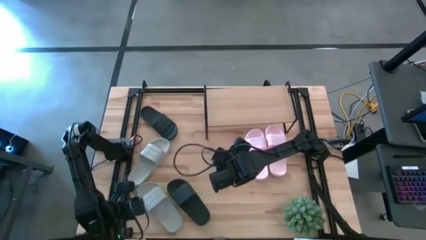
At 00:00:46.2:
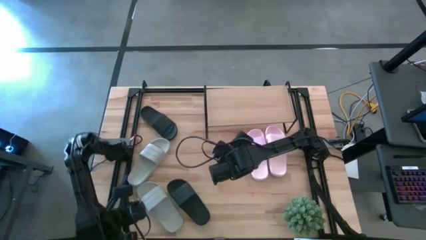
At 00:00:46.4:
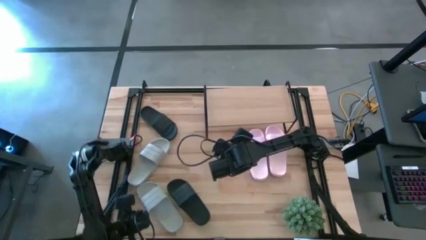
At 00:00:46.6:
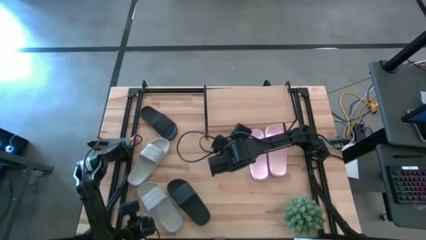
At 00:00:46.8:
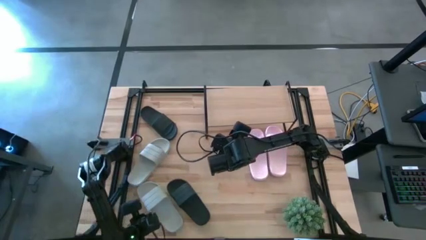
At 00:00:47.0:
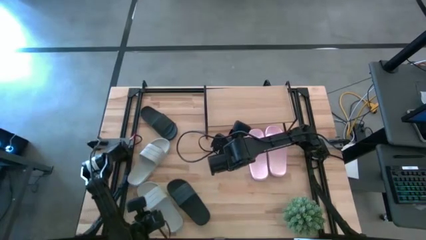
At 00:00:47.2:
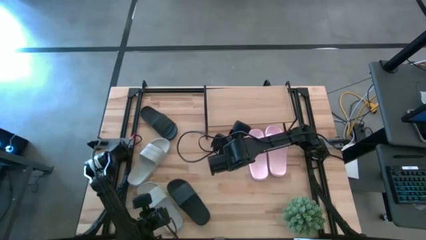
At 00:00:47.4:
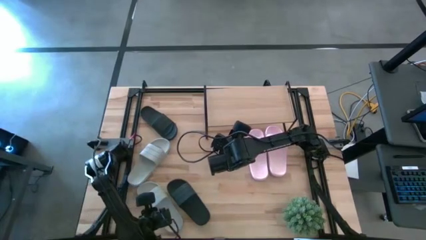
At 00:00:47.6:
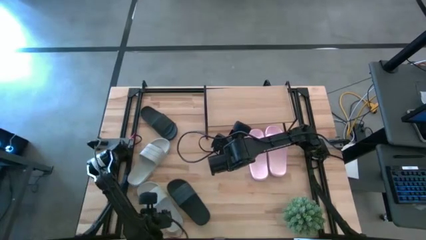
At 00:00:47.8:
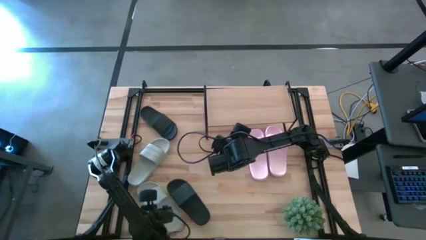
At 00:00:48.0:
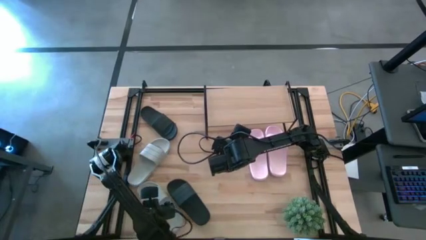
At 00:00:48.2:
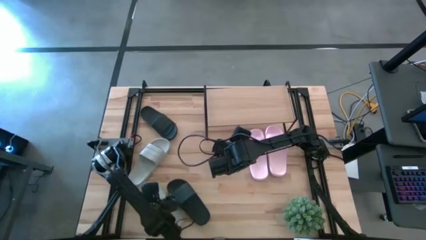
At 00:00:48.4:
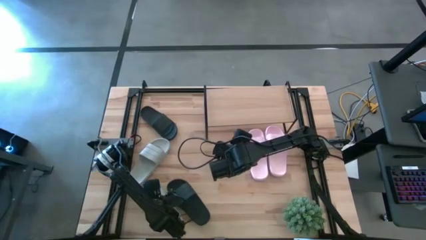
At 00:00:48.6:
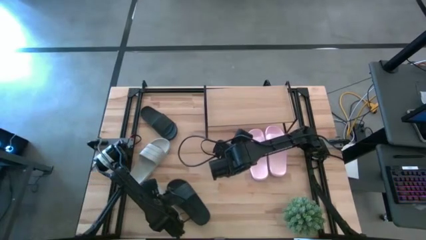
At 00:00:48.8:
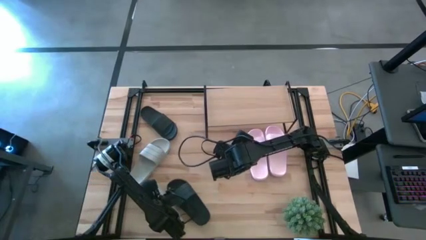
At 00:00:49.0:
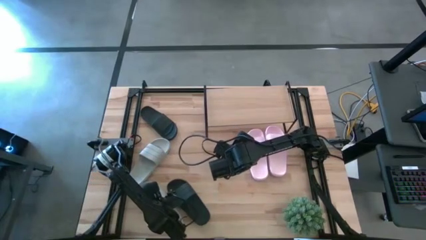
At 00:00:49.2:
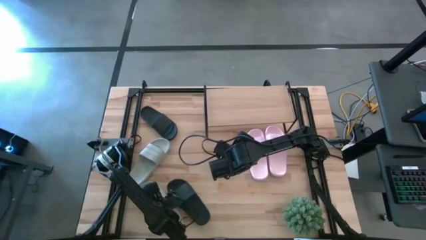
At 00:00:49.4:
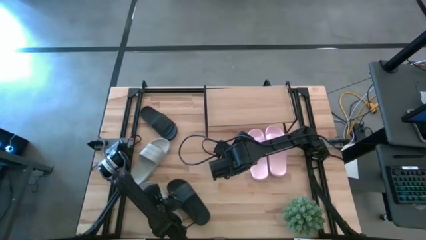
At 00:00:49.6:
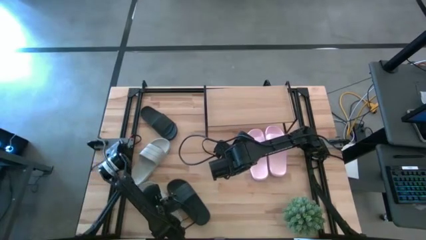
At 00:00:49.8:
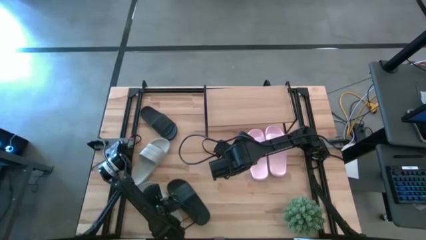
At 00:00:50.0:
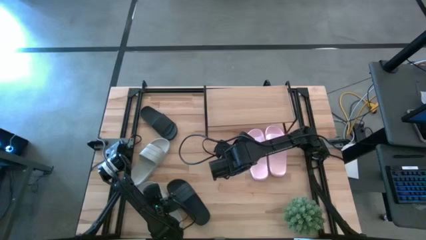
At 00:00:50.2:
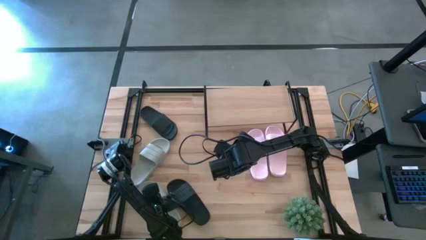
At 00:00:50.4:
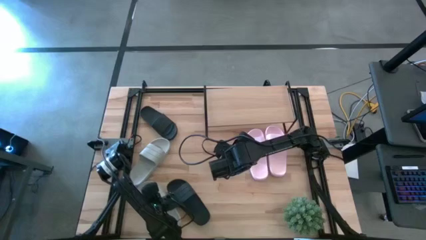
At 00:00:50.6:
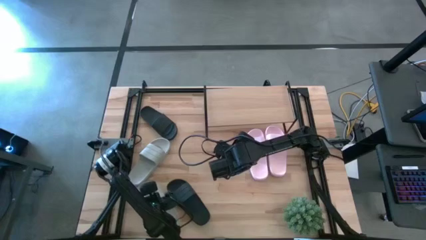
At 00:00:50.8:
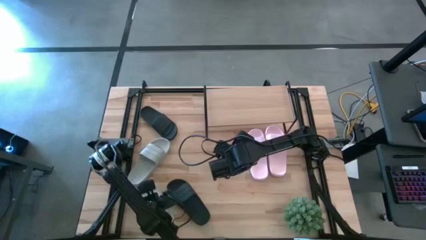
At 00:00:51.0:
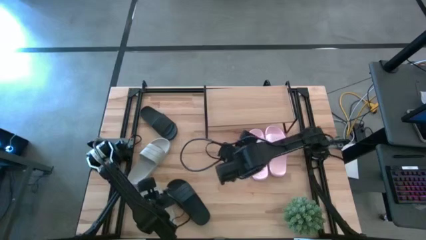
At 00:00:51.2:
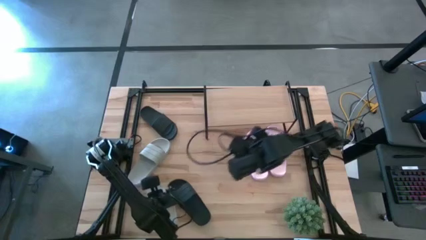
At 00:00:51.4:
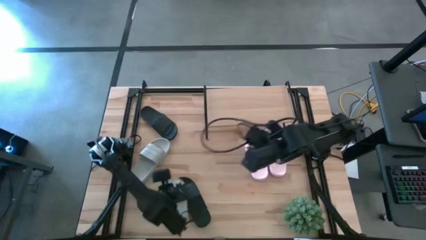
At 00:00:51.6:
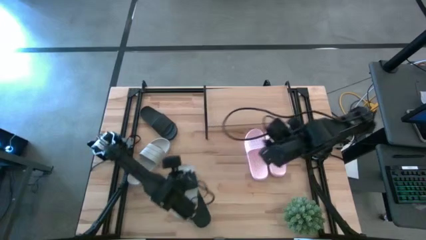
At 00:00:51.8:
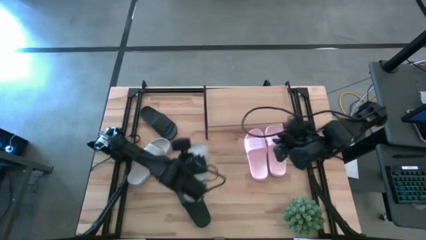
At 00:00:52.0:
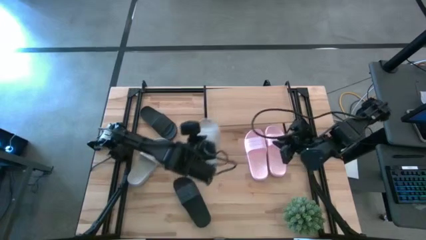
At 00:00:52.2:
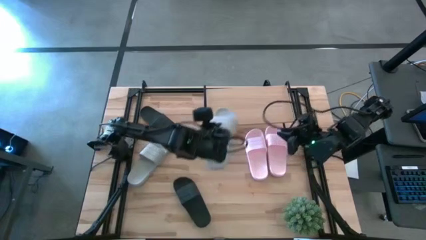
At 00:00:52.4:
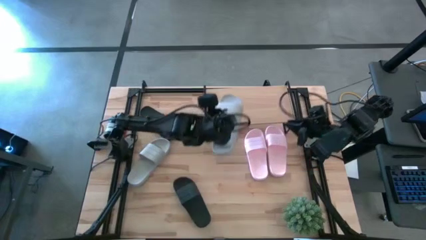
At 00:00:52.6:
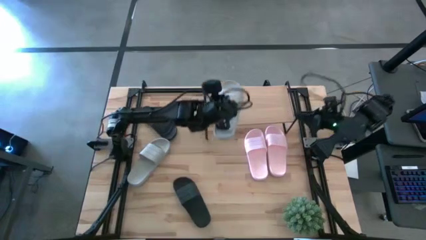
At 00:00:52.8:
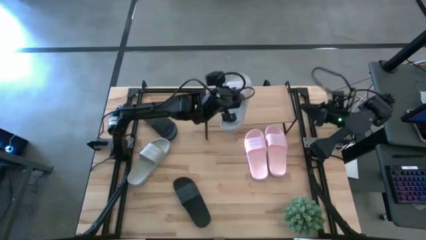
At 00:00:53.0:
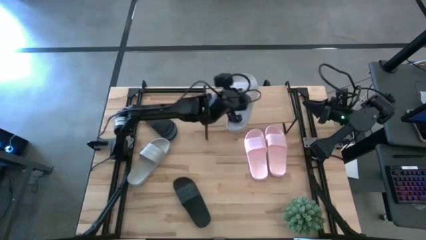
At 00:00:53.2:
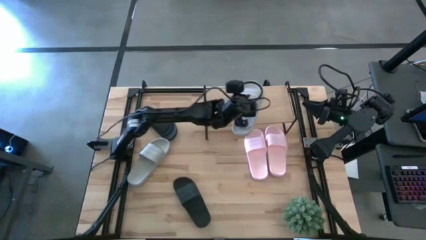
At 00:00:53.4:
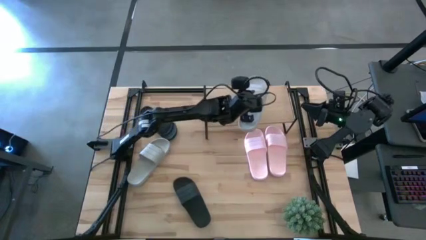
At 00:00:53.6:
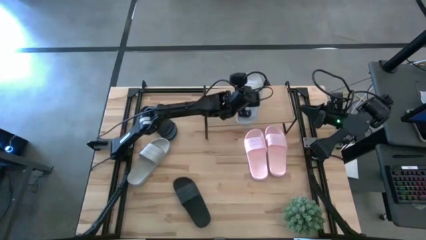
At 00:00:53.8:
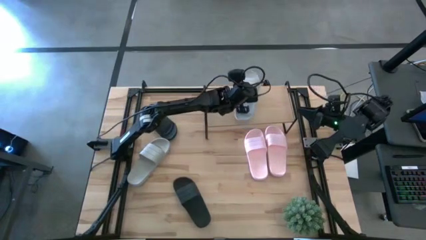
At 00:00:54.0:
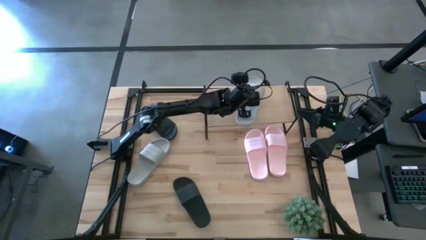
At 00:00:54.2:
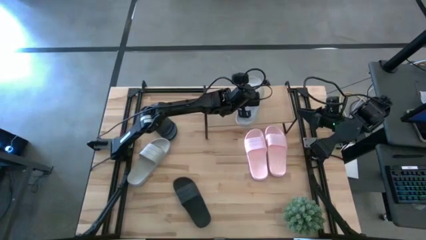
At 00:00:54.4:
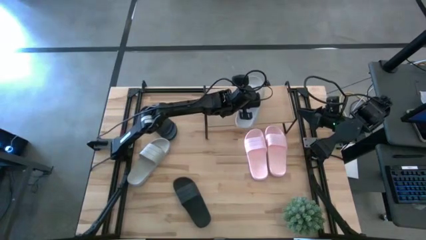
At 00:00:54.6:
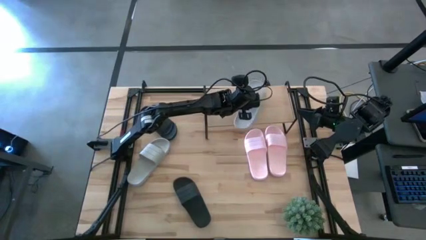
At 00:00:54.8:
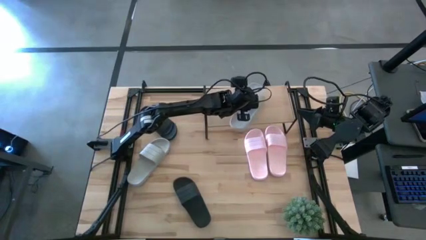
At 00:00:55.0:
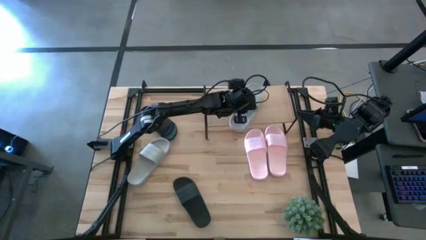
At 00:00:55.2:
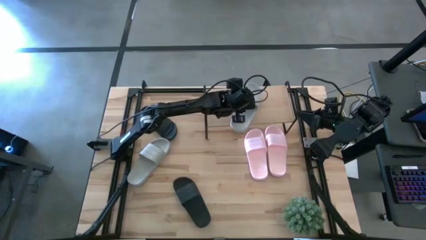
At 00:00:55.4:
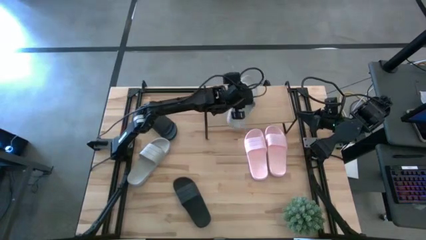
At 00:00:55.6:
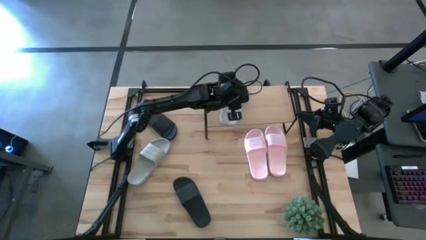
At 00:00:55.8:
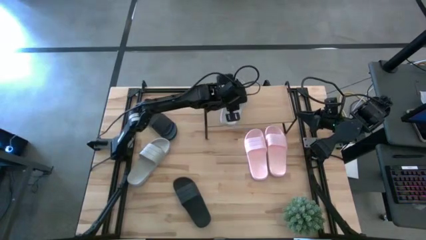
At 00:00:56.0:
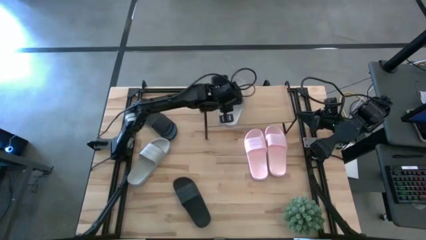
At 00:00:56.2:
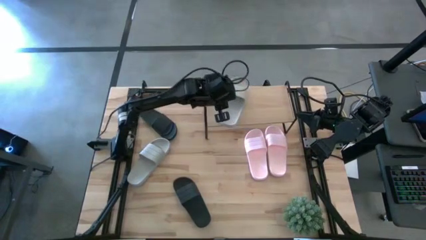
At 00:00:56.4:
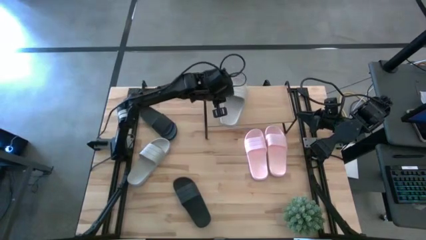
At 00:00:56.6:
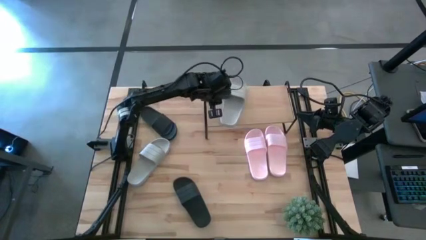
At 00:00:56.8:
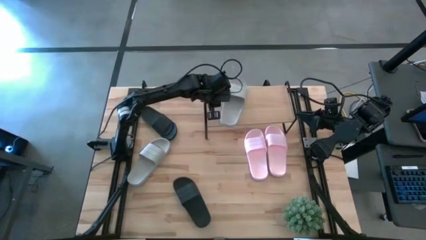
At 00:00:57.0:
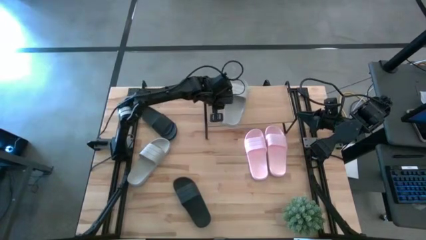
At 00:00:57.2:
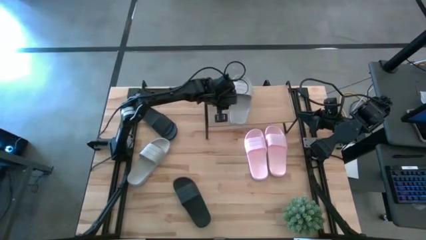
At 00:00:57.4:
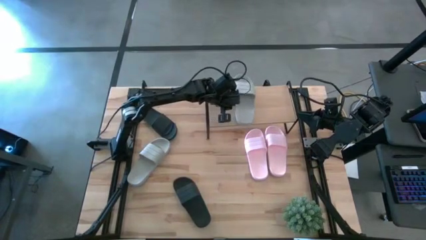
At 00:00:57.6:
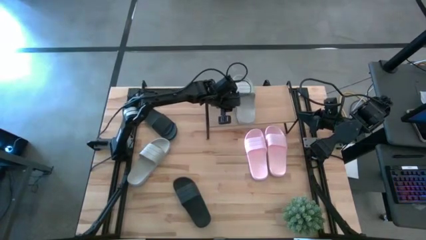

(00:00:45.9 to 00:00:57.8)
Task: Pick and place slides into the shelf
Put the bottom gray slide on the shelf
